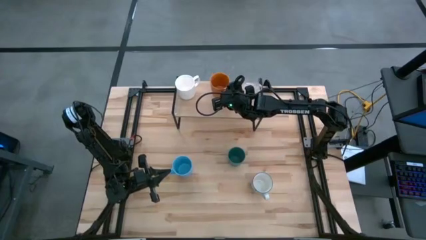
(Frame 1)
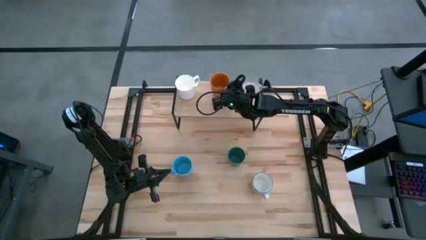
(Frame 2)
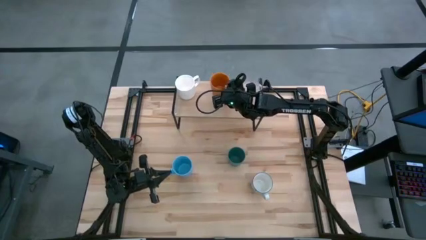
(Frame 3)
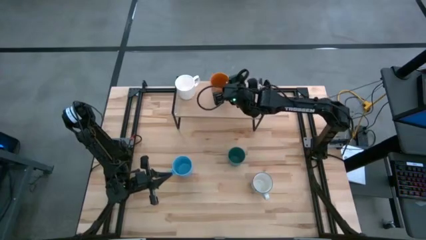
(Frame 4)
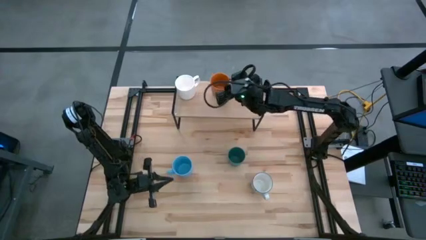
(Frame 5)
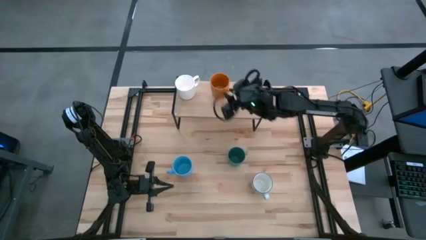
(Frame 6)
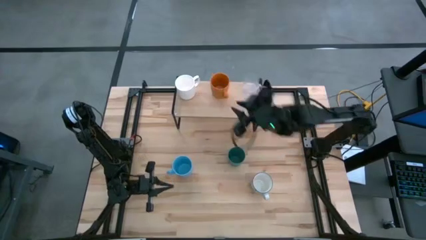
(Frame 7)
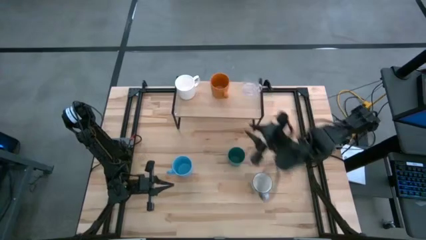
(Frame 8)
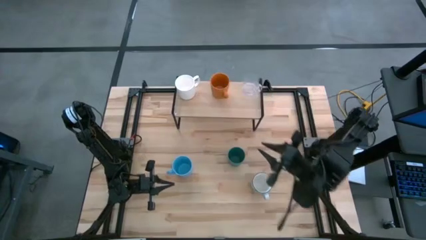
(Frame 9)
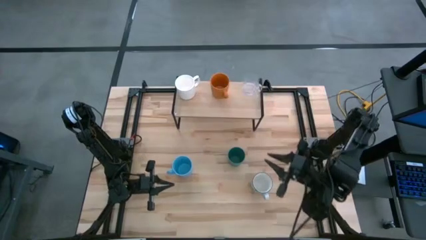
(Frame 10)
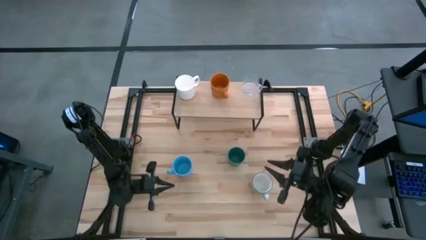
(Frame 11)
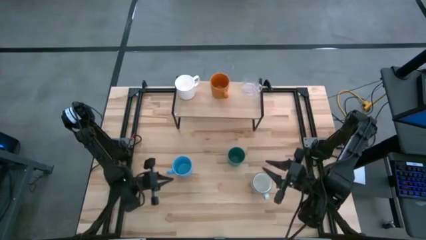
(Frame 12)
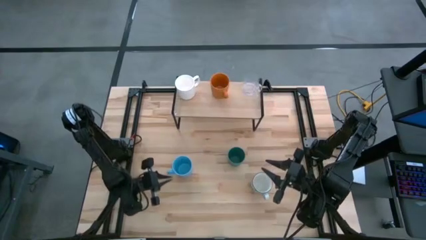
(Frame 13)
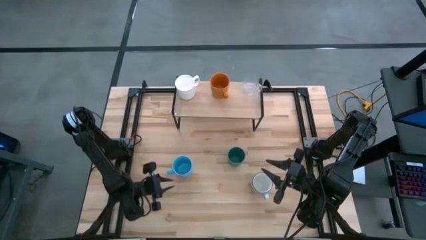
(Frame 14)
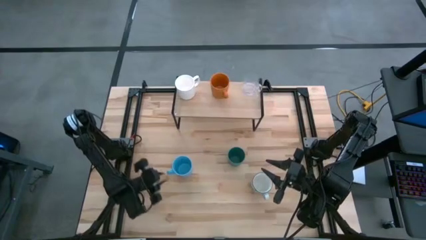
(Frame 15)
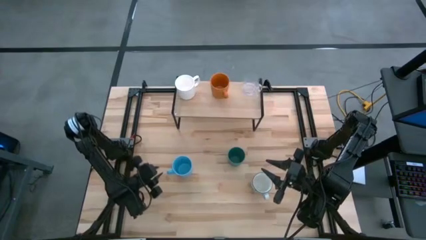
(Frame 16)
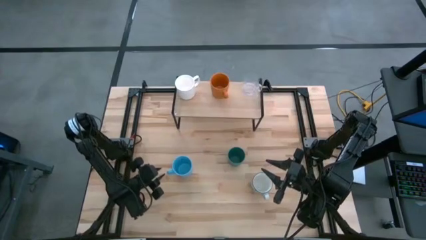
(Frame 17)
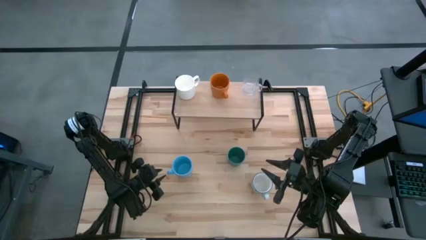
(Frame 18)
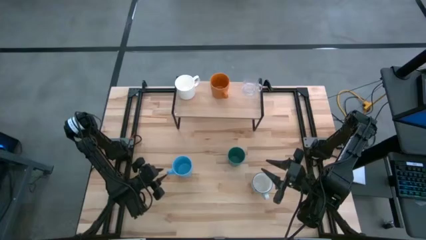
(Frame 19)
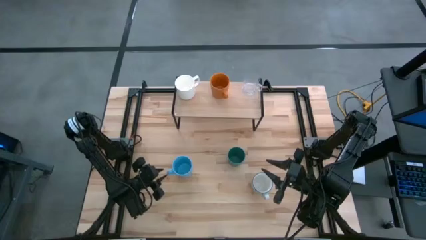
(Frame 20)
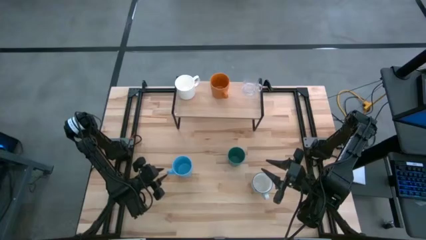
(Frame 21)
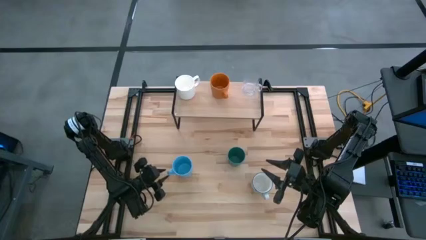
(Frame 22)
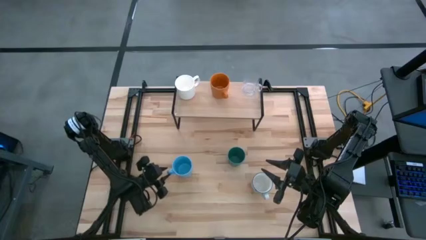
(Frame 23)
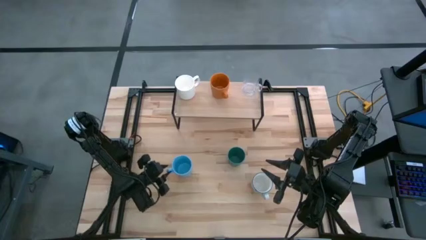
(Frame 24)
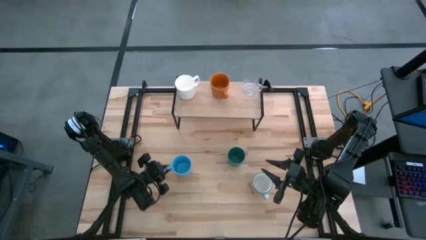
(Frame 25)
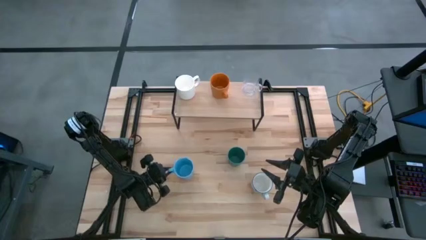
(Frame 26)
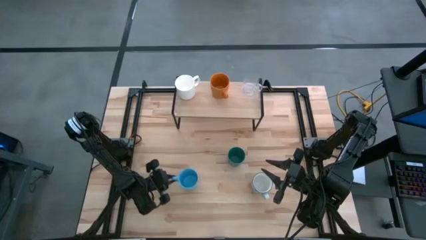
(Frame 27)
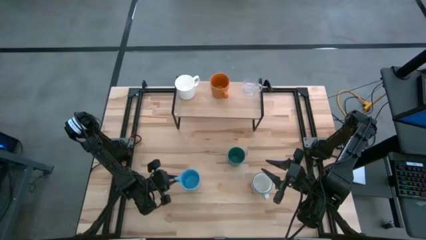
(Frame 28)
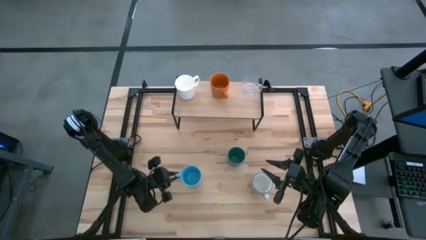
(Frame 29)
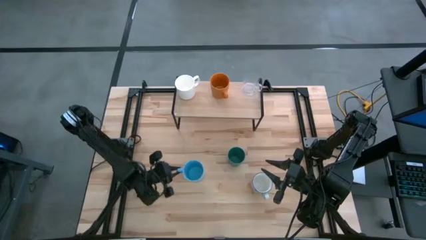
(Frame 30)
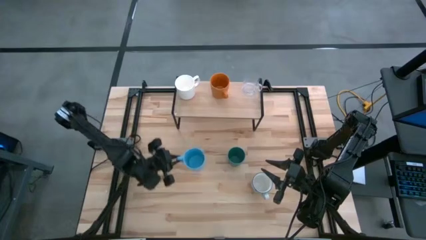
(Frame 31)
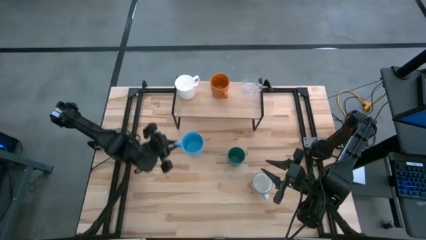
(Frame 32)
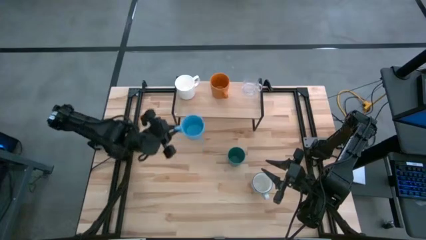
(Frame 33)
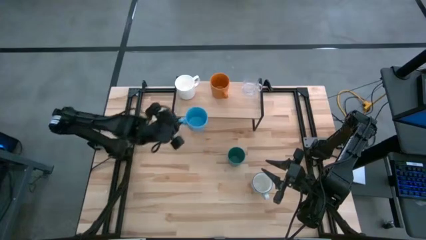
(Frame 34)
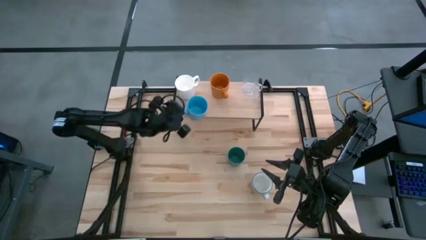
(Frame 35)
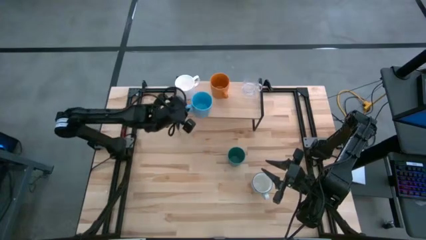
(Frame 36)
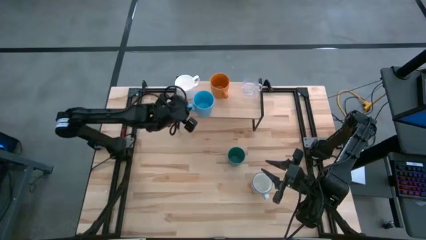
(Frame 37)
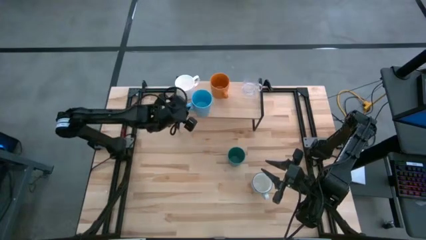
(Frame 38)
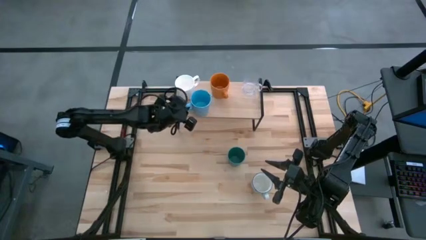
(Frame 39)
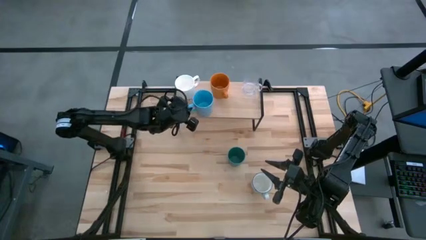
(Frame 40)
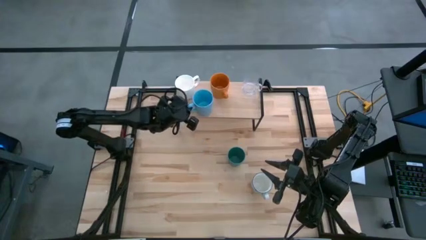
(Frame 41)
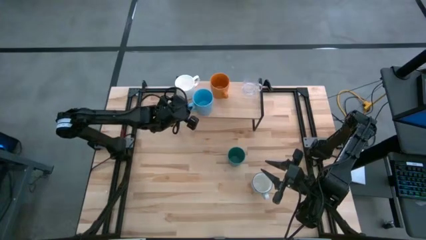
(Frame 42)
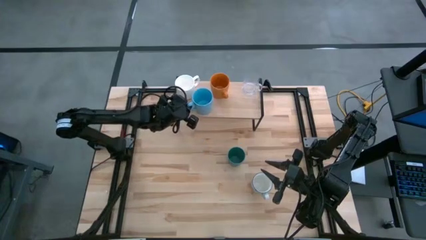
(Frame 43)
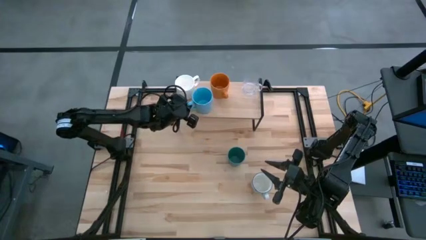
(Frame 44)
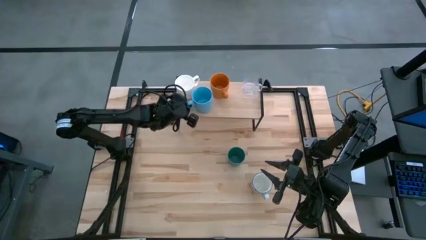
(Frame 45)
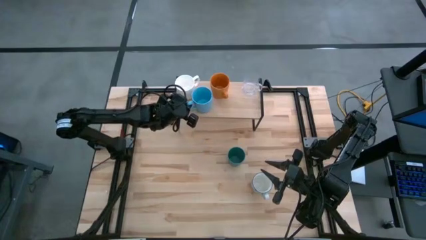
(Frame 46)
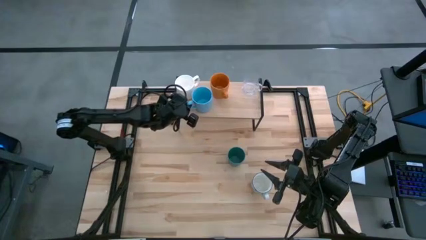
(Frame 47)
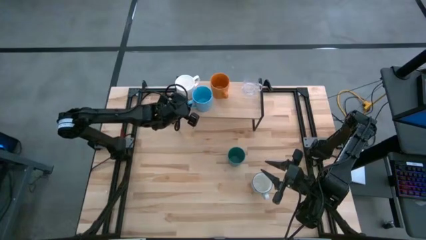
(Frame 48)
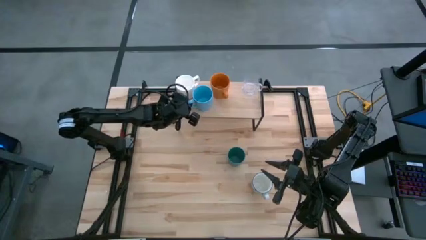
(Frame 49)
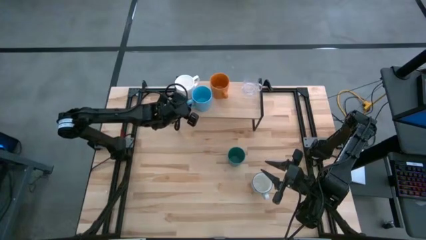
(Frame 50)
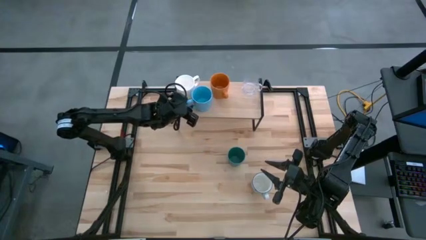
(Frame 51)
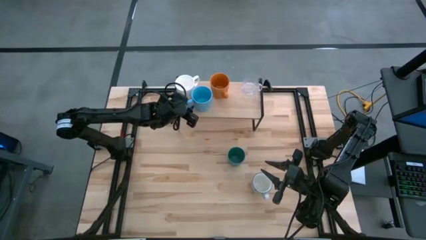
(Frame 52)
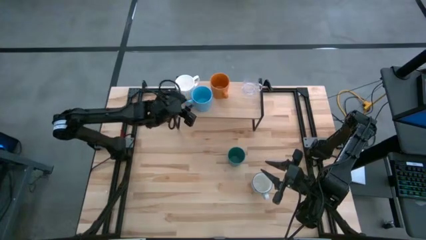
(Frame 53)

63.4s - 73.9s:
Task: Stack small to large cups/mugs on shelf
Put the blue cup on the shelf

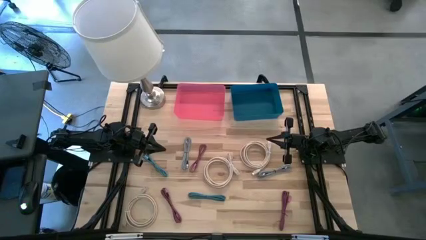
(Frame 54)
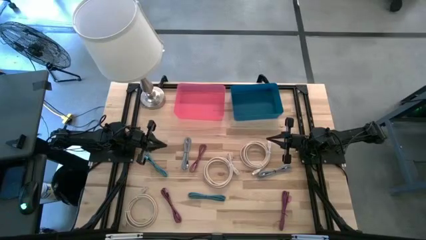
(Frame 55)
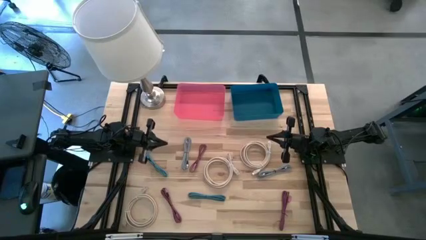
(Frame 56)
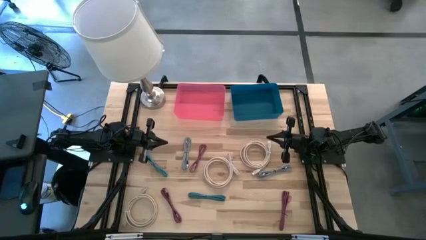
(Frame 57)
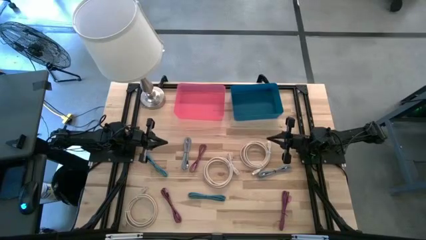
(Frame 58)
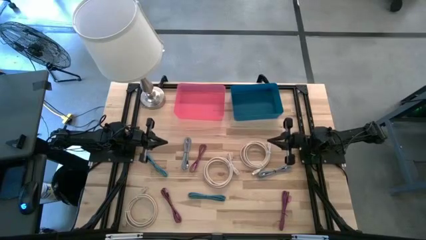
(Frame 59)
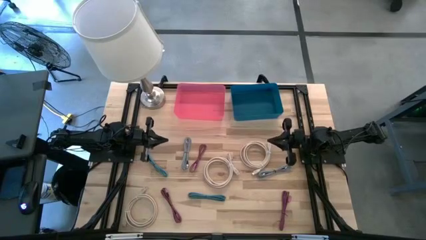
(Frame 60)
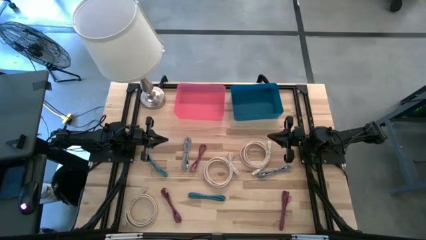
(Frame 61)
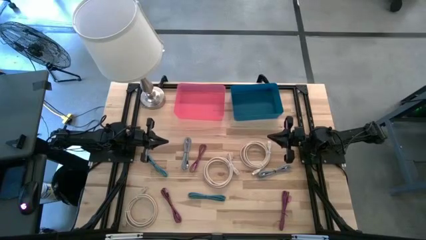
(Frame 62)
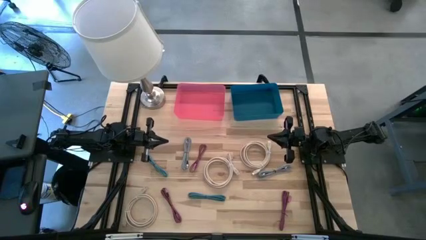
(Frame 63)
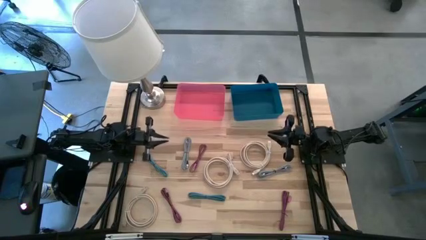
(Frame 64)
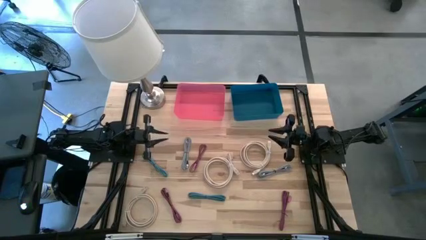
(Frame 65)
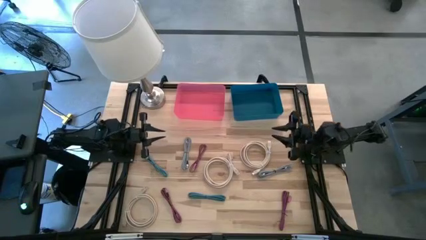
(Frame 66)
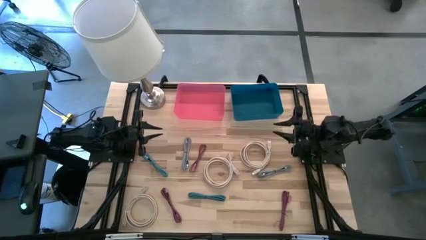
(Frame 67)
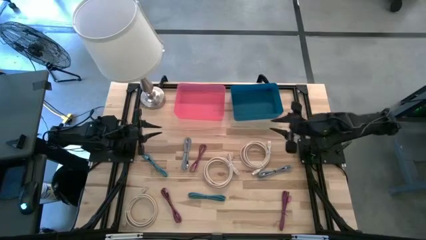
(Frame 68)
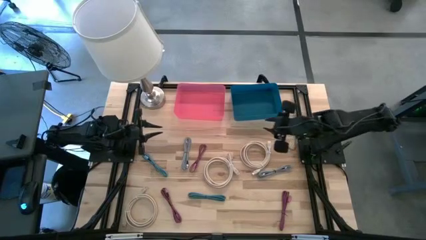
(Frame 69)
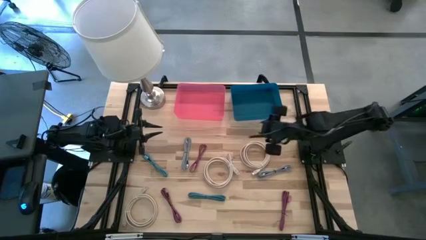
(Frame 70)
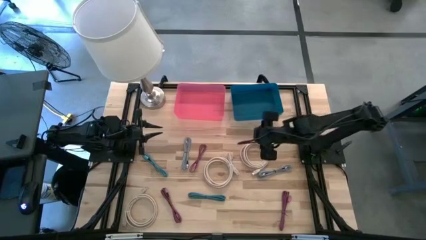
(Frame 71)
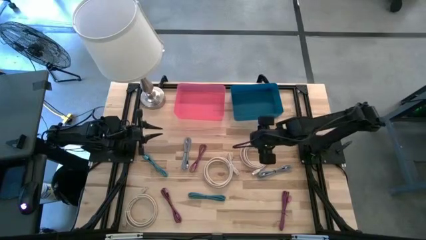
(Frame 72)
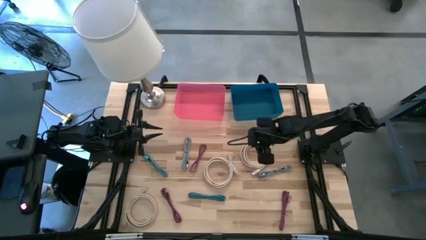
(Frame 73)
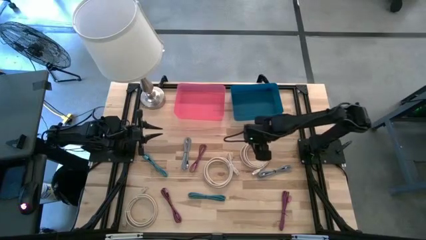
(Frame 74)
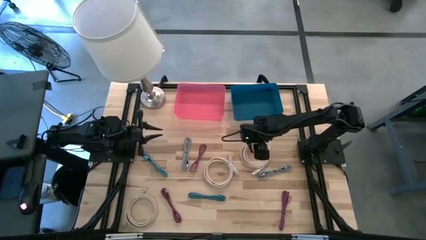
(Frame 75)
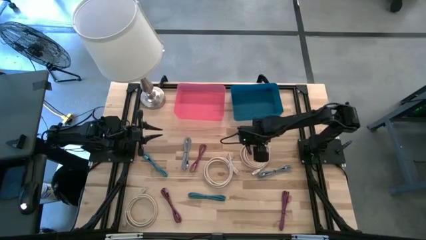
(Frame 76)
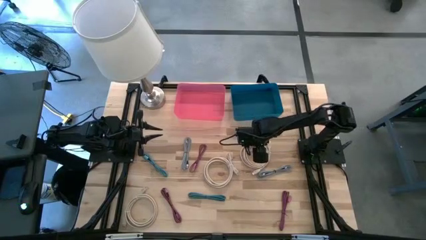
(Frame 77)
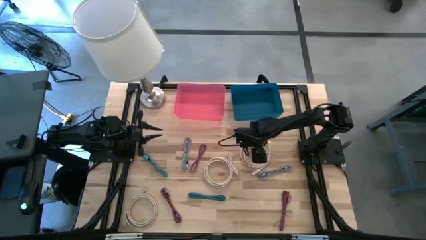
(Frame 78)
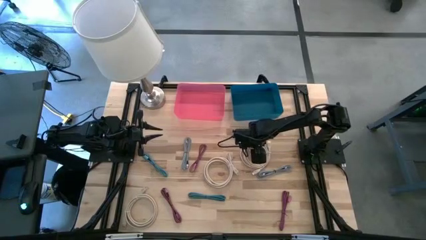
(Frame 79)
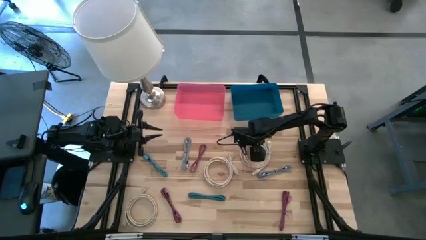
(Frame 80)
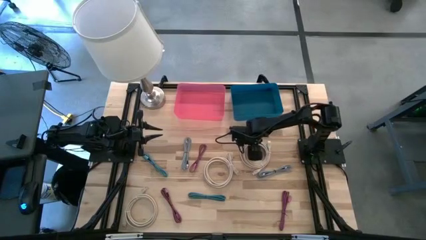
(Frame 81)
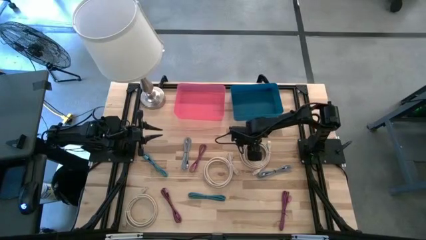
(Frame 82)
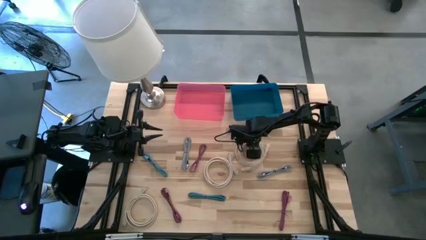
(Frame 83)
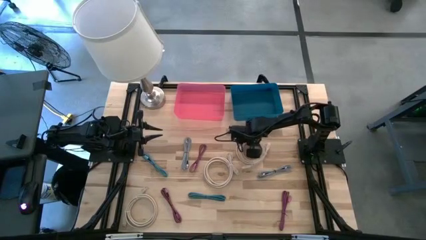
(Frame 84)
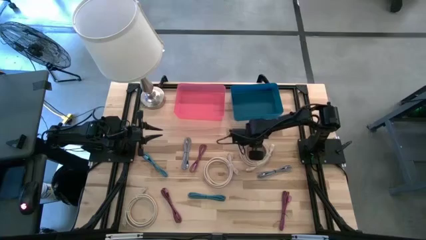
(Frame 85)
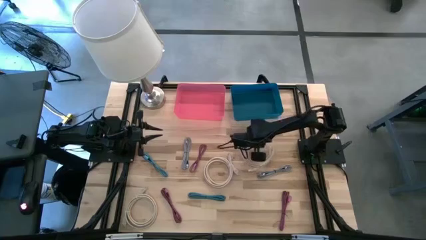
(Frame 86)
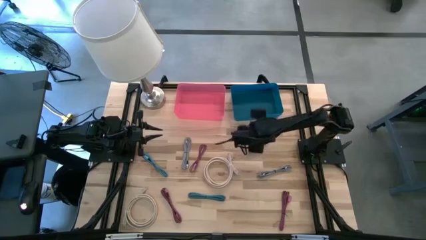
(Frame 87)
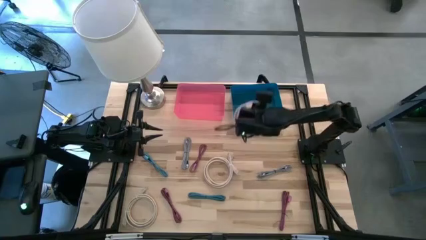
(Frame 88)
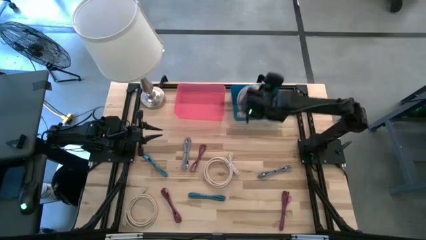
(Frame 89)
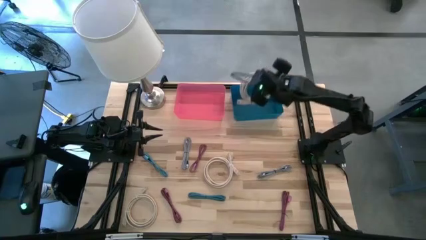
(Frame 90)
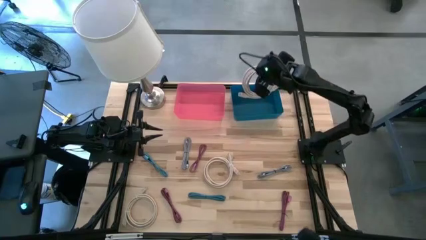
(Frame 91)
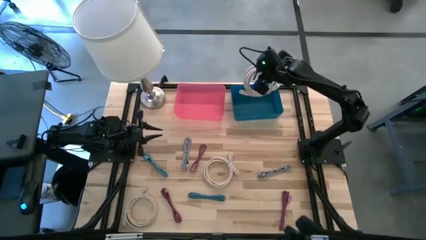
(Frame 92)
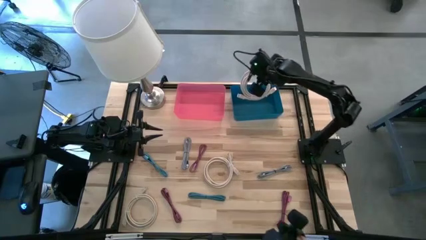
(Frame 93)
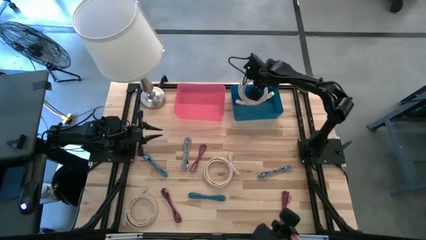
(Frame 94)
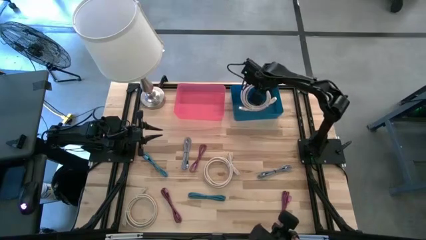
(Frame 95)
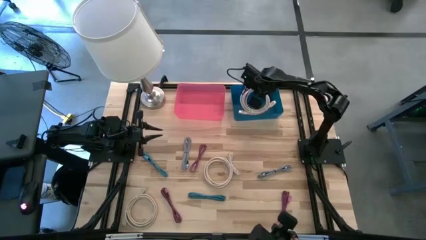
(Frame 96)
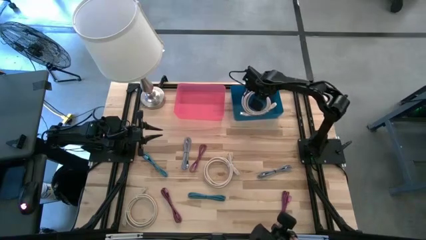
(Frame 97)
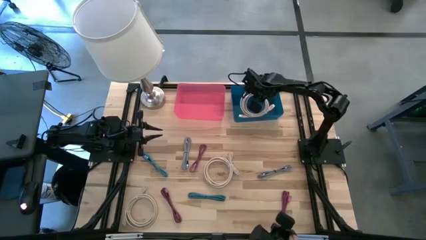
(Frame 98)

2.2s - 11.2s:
Task: Pick & Place USB Port
Put the top brown HDMI cable into the blue bin
